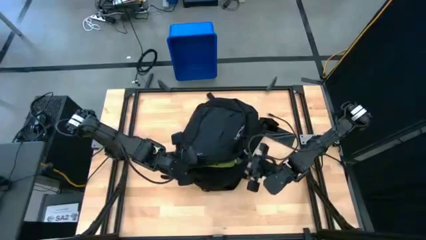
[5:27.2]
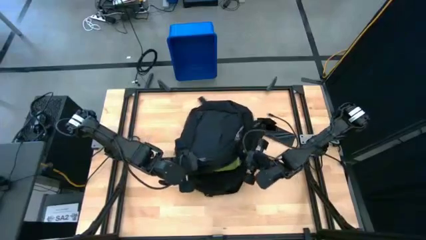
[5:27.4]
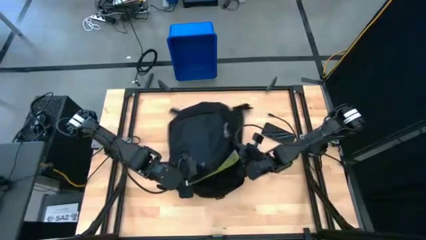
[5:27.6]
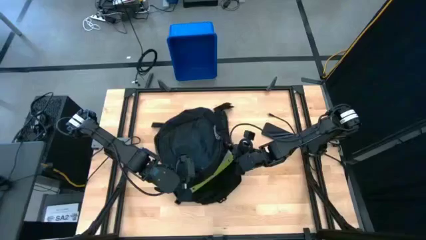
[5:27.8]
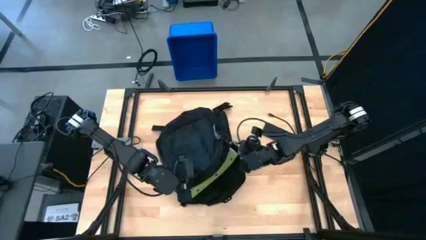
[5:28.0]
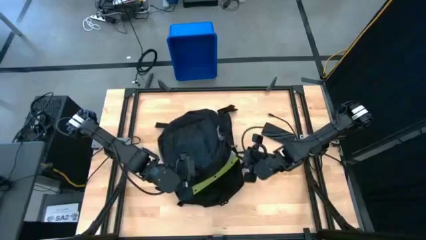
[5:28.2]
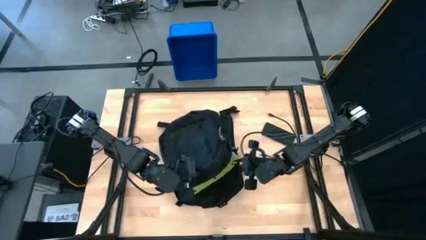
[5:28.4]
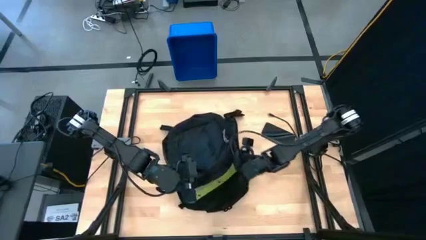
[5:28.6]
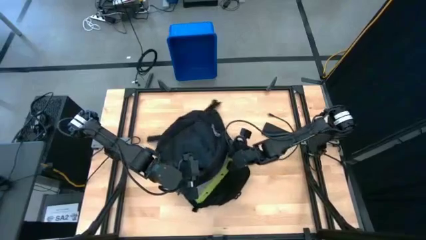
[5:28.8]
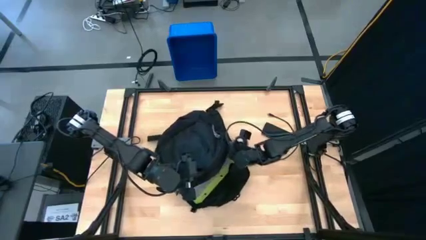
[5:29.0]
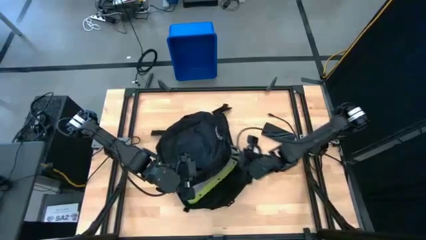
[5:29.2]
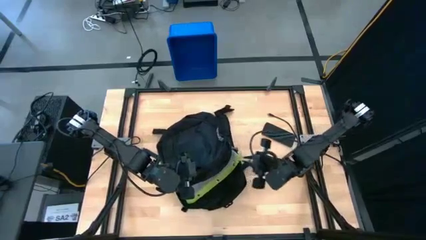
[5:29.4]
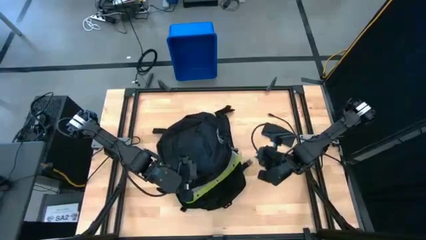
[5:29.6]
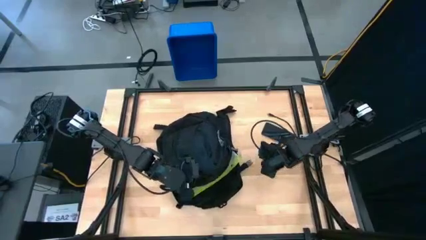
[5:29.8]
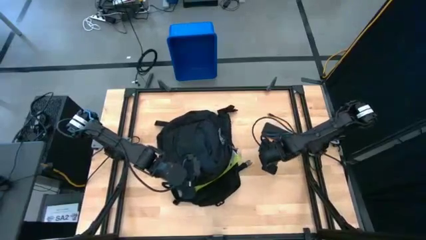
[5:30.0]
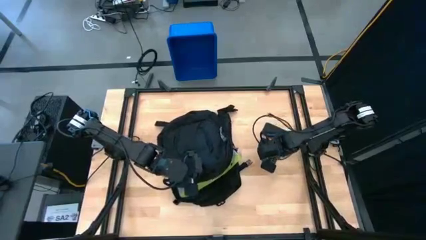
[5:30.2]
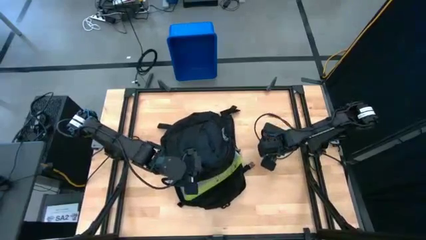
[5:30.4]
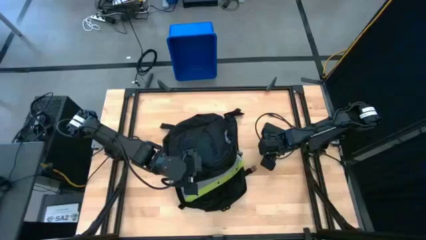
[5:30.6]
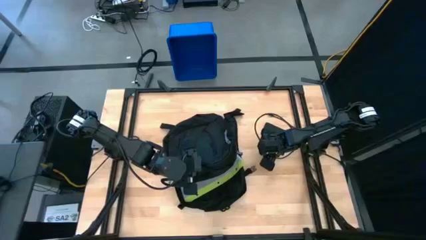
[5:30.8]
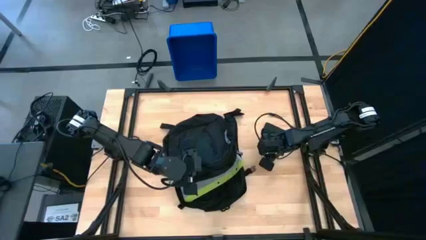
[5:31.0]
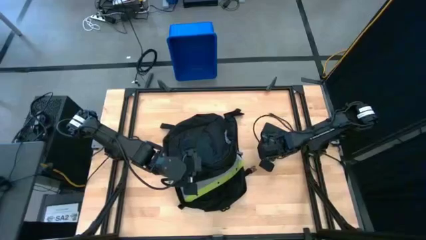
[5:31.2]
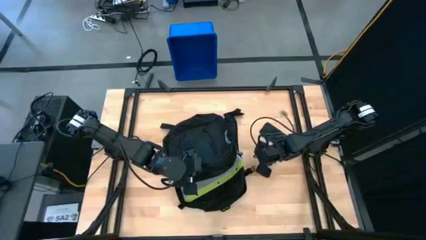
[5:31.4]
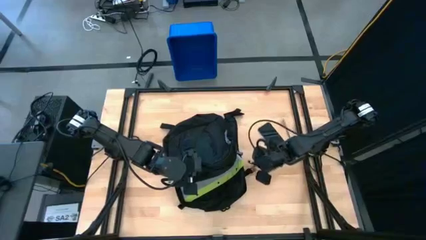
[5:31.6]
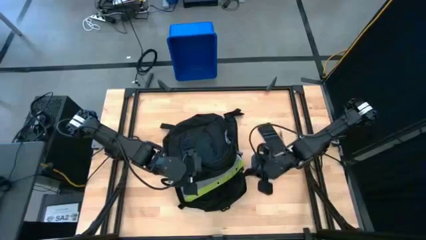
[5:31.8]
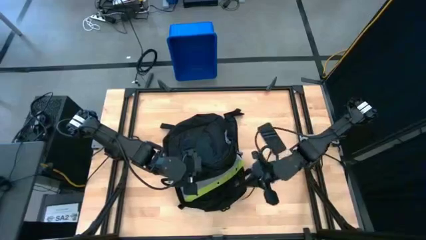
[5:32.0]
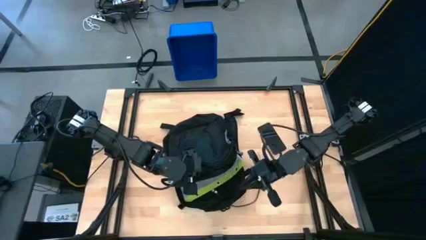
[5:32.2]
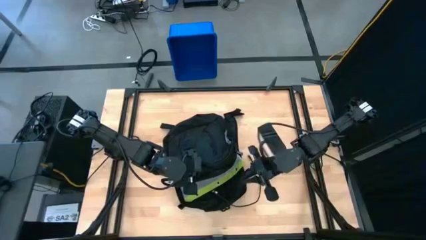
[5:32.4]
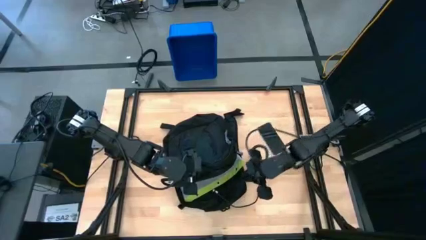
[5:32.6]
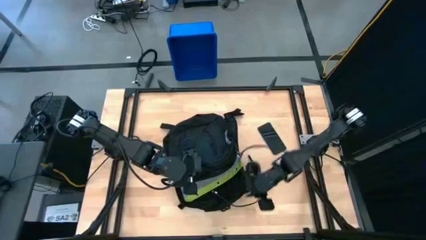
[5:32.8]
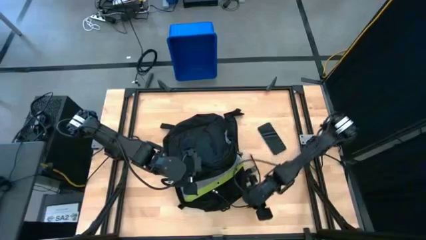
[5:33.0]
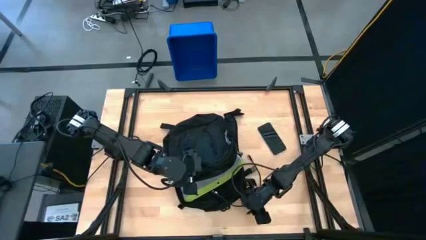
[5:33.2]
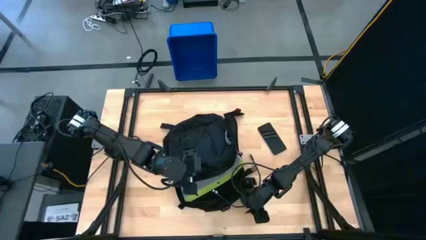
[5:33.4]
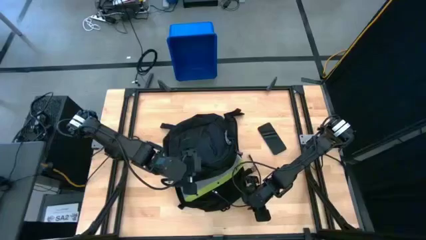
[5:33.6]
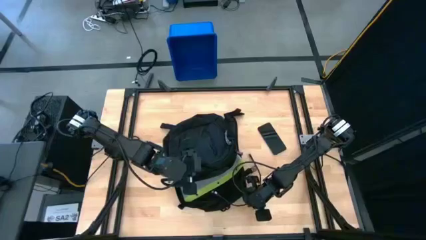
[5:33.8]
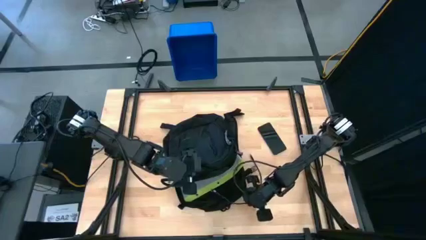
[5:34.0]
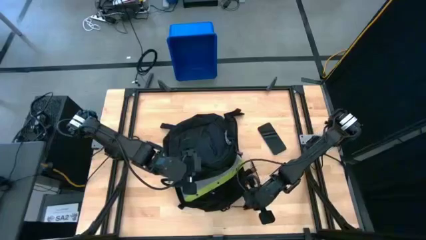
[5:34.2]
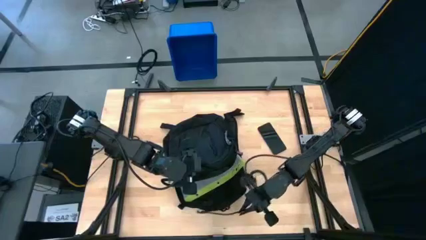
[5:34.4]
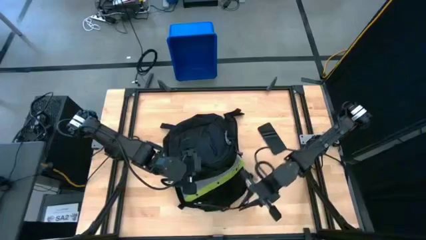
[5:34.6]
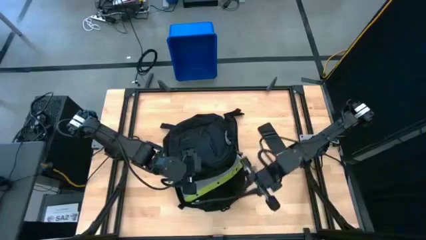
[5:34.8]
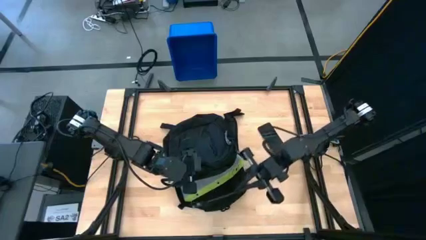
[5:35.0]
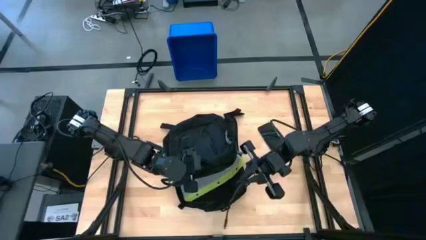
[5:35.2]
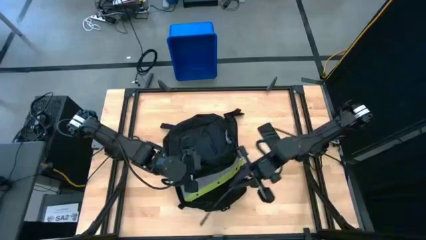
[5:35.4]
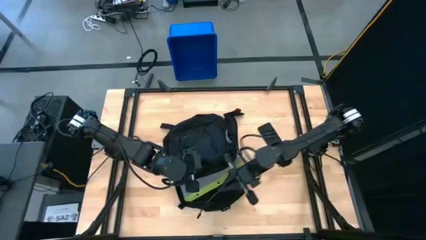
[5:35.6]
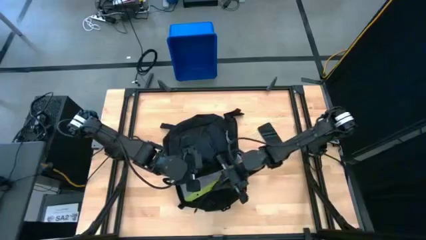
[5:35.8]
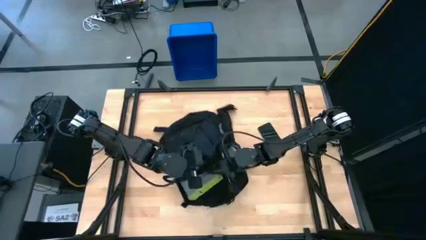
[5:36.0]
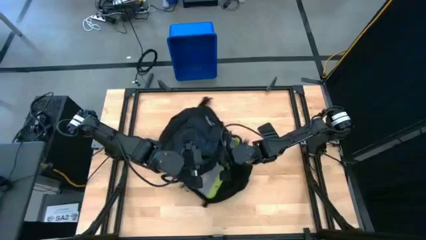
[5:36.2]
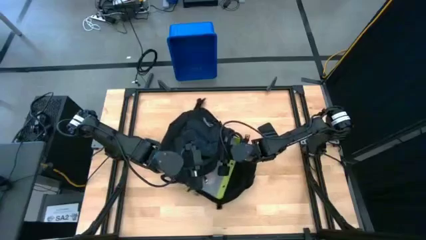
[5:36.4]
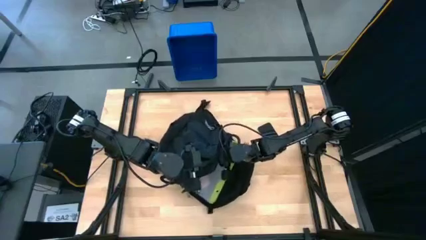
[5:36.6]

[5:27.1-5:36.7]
Task: Unpack backpack
Put the usb cable into the backpack

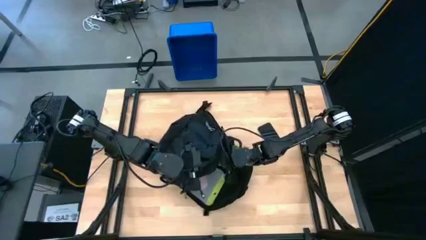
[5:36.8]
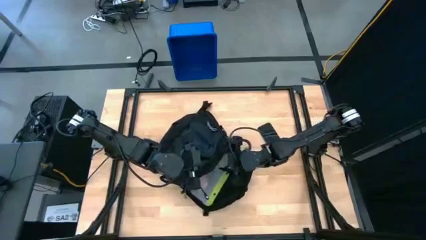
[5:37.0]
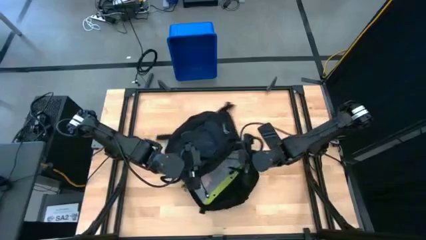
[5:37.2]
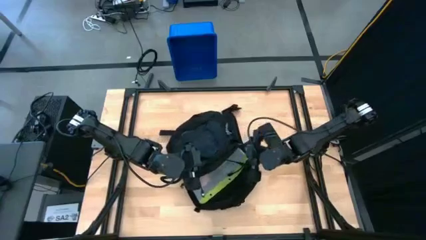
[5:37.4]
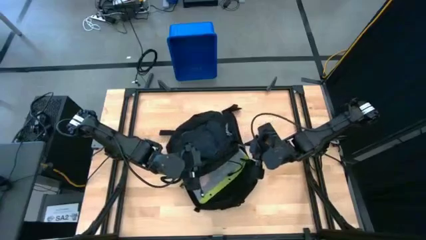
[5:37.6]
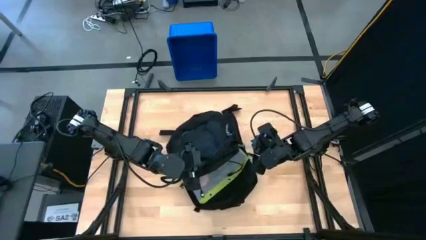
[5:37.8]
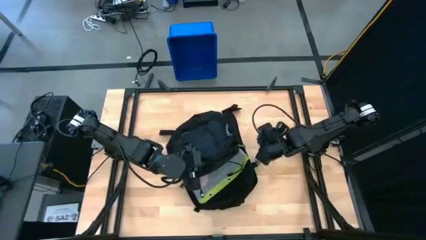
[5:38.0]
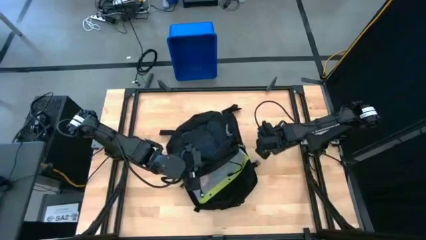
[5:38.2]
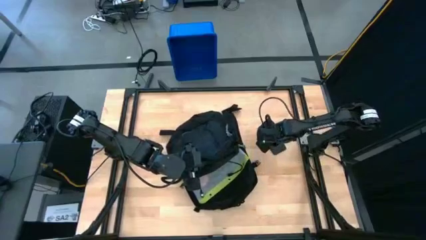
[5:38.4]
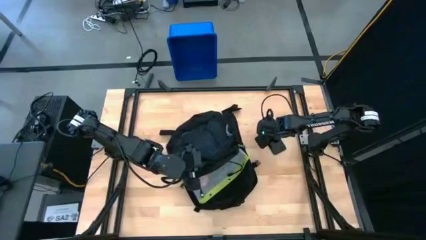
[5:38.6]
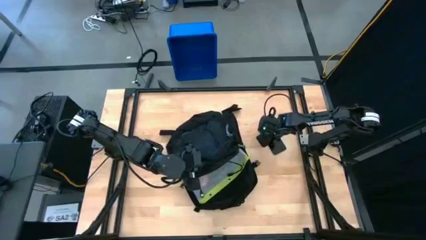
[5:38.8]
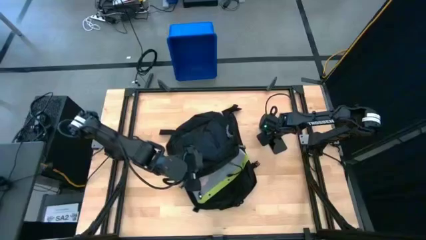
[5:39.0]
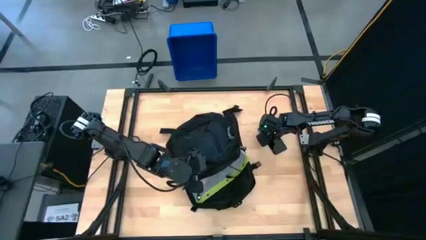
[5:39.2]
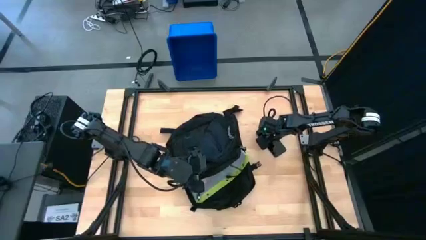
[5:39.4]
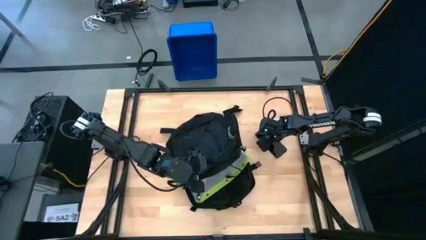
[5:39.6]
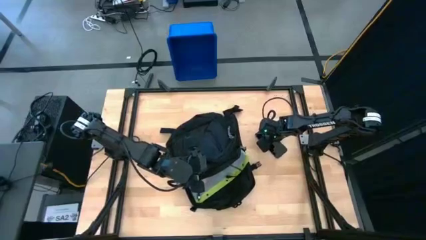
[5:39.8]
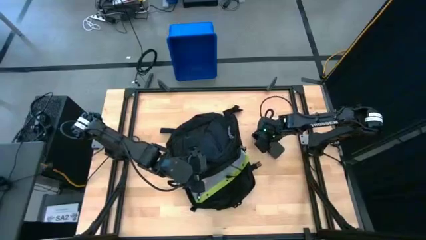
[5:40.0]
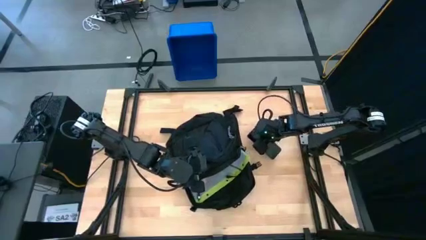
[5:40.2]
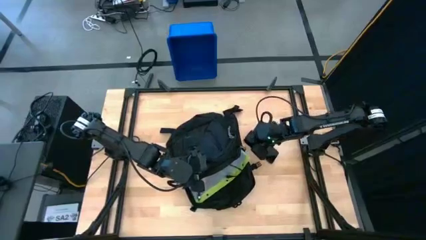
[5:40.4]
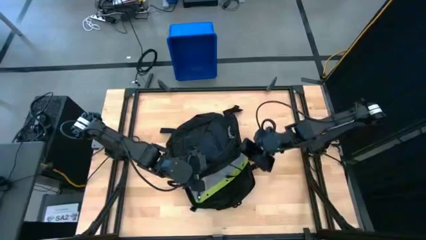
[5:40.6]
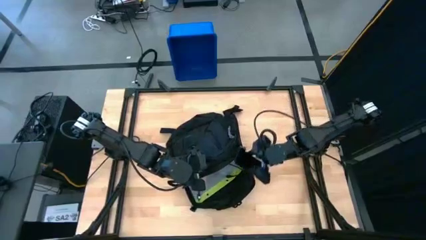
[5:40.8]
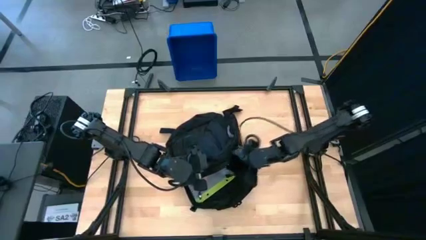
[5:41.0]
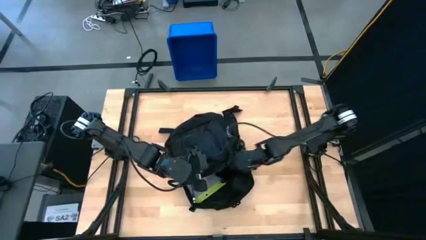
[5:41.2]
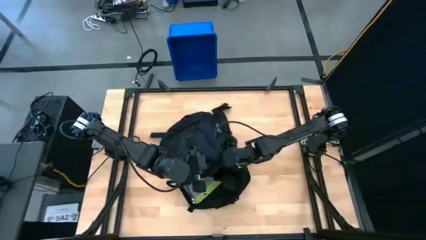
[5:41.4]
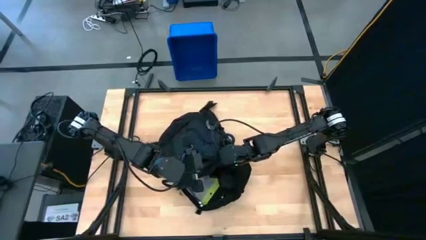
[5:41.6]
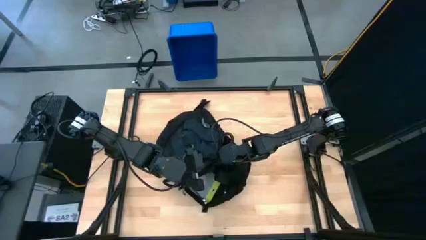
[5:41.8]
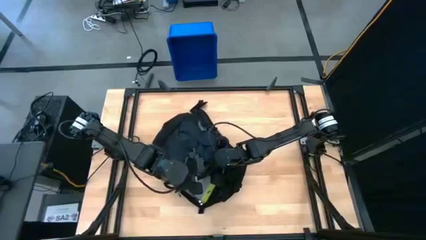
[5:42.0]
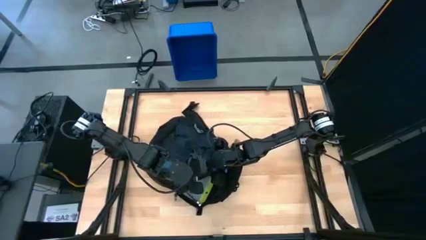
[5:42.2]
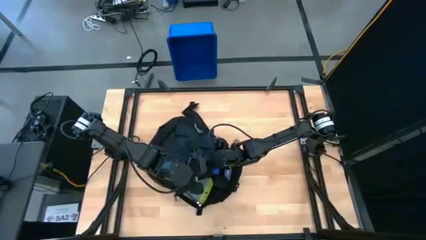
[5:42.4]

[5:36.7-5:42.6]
Put the phone into the backpack
